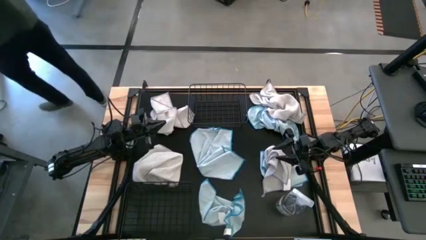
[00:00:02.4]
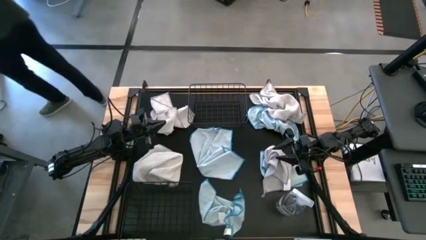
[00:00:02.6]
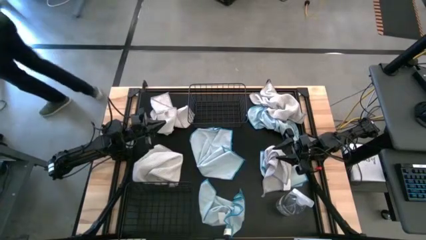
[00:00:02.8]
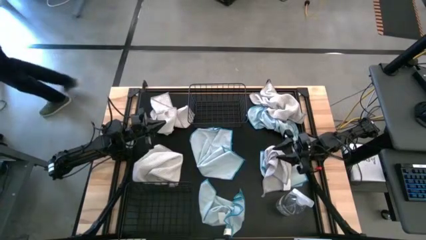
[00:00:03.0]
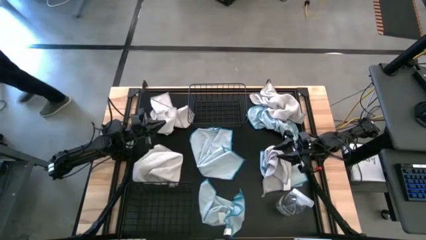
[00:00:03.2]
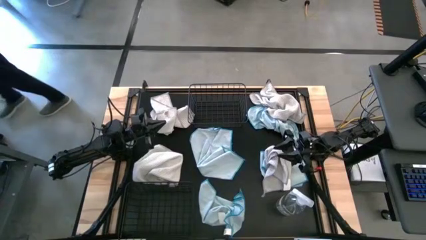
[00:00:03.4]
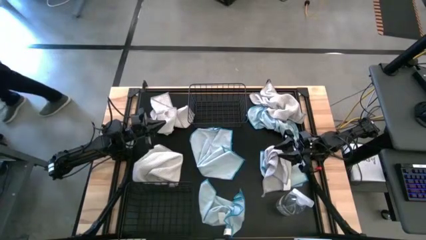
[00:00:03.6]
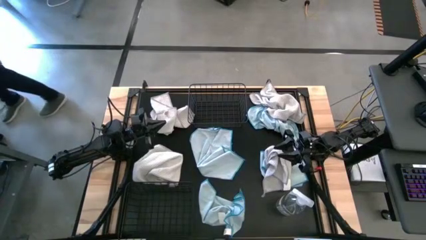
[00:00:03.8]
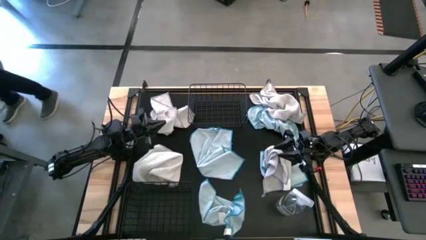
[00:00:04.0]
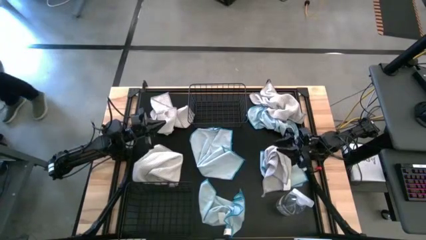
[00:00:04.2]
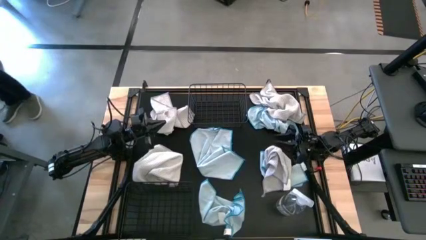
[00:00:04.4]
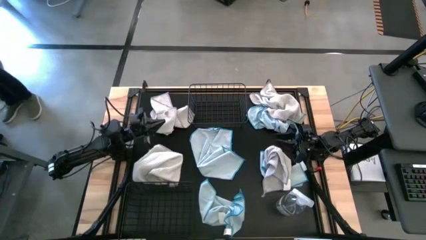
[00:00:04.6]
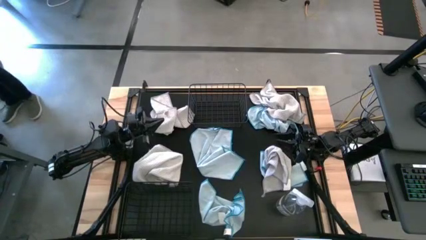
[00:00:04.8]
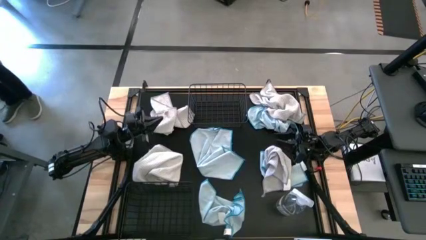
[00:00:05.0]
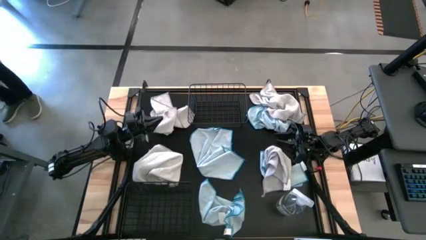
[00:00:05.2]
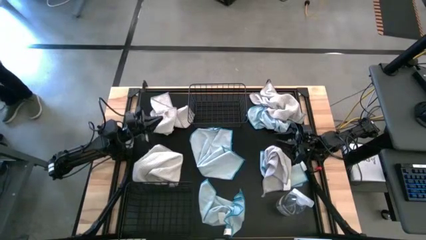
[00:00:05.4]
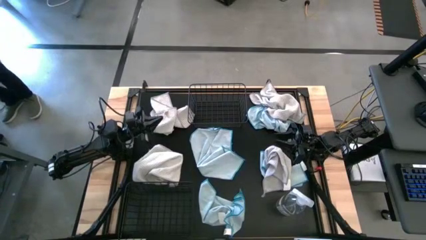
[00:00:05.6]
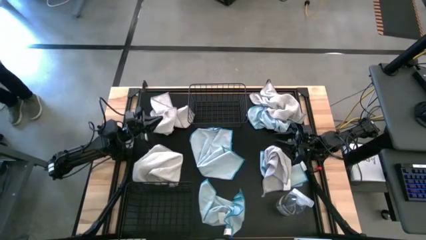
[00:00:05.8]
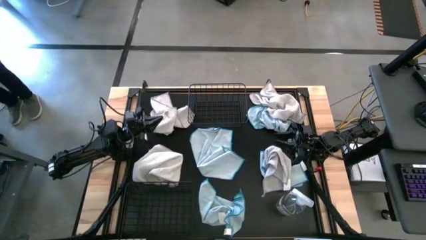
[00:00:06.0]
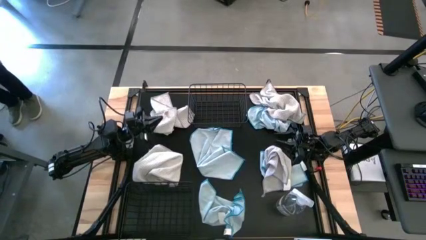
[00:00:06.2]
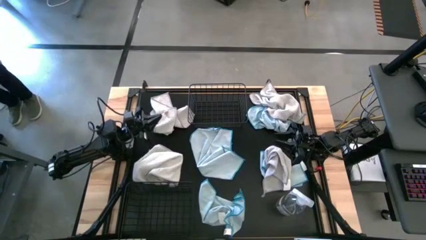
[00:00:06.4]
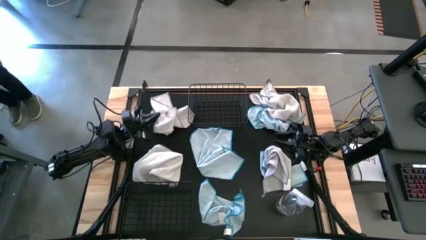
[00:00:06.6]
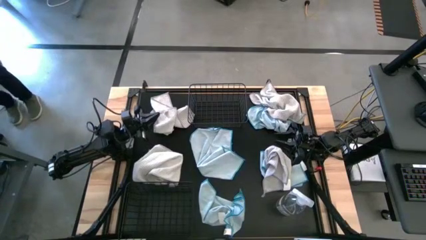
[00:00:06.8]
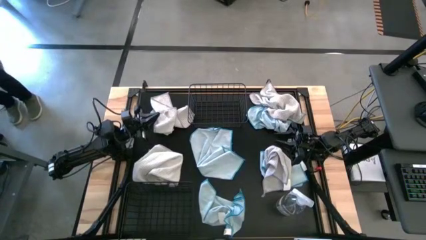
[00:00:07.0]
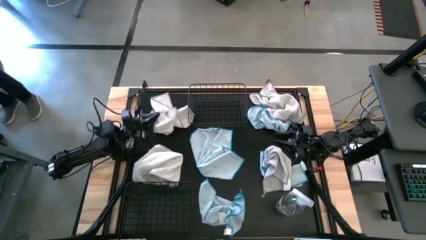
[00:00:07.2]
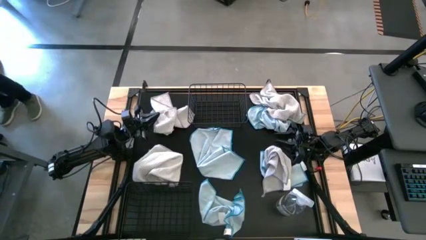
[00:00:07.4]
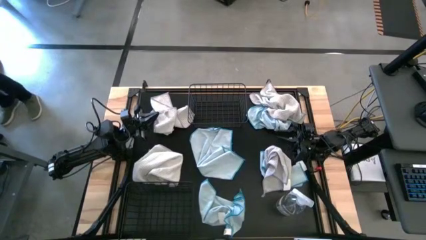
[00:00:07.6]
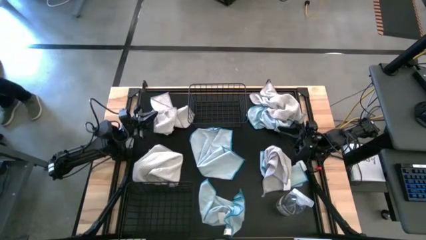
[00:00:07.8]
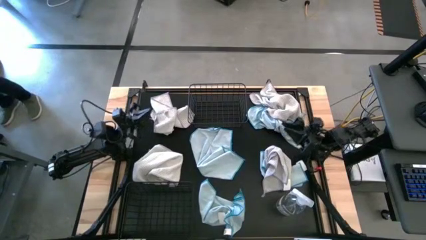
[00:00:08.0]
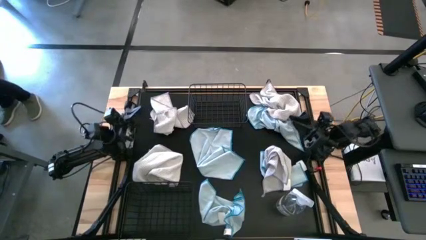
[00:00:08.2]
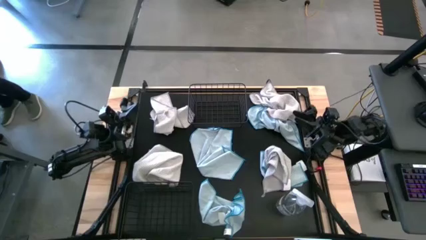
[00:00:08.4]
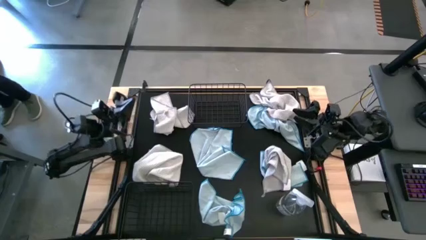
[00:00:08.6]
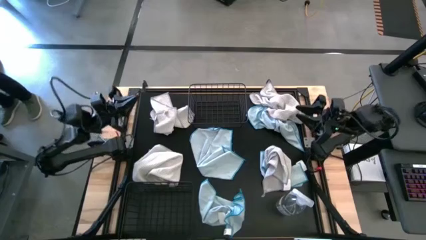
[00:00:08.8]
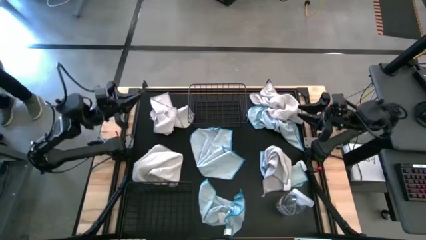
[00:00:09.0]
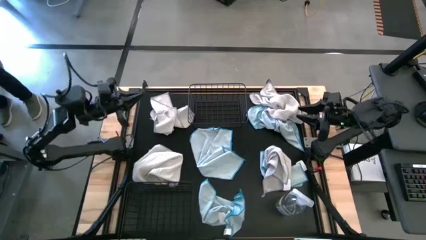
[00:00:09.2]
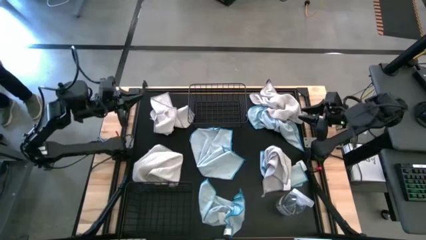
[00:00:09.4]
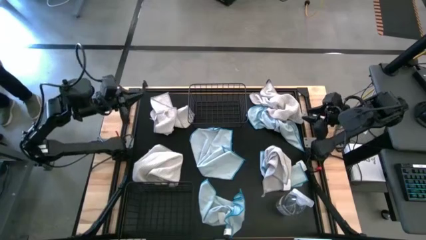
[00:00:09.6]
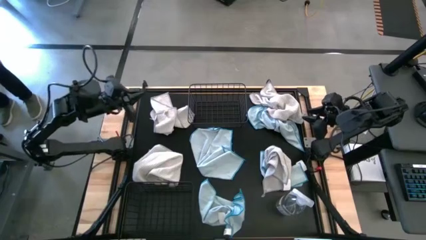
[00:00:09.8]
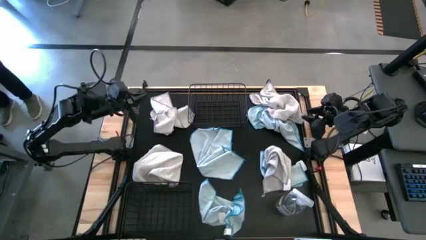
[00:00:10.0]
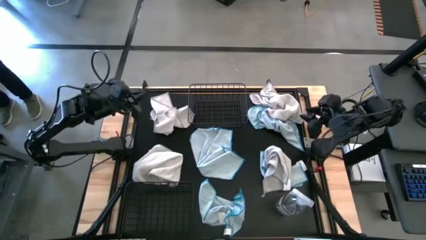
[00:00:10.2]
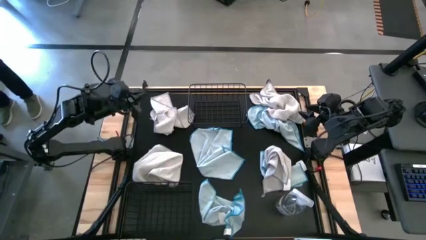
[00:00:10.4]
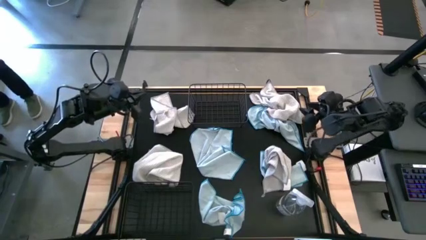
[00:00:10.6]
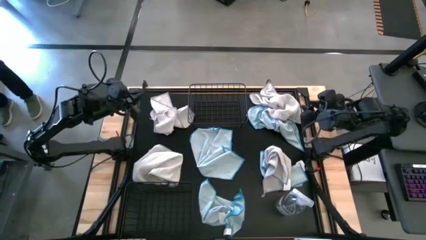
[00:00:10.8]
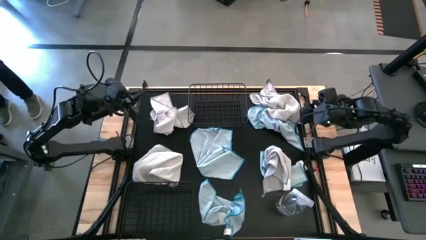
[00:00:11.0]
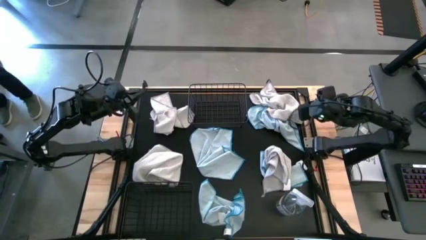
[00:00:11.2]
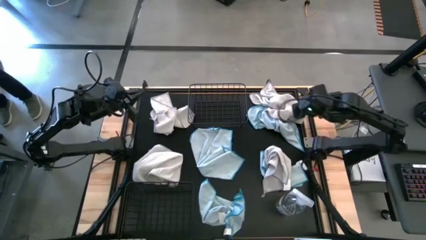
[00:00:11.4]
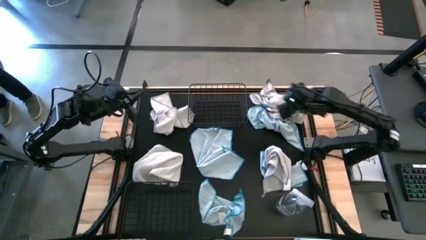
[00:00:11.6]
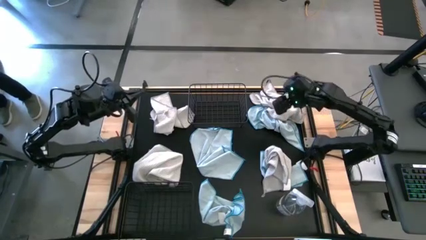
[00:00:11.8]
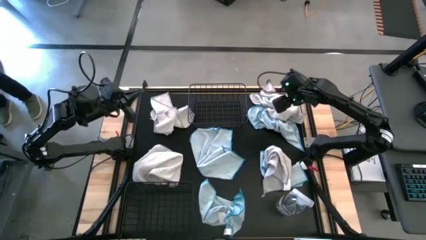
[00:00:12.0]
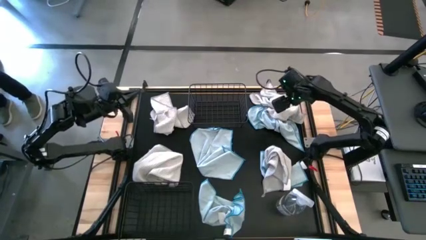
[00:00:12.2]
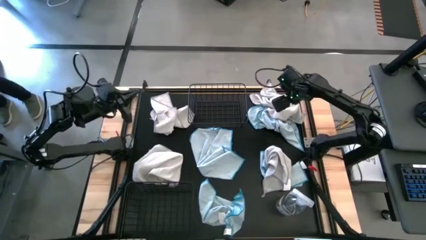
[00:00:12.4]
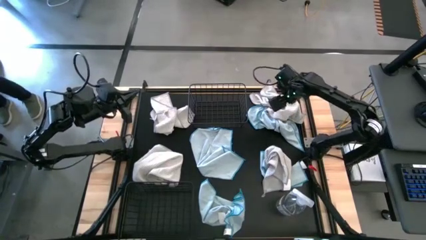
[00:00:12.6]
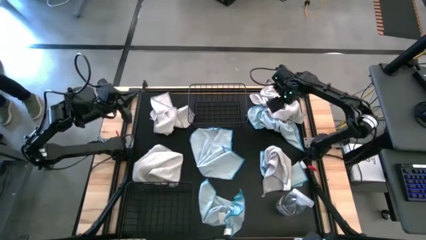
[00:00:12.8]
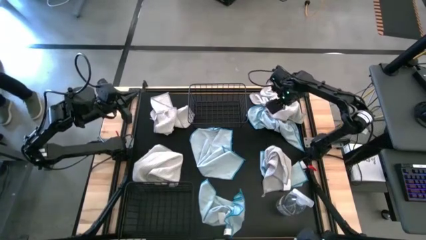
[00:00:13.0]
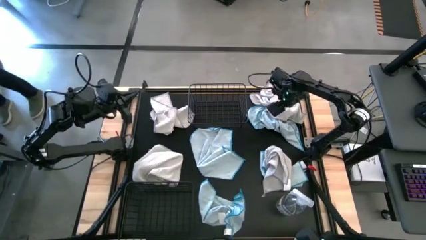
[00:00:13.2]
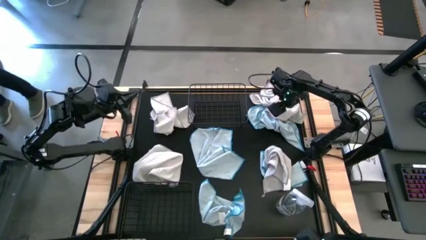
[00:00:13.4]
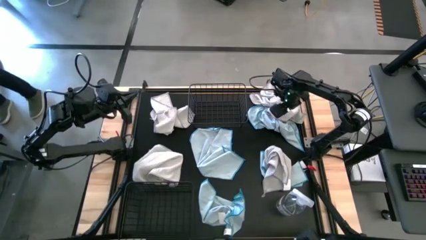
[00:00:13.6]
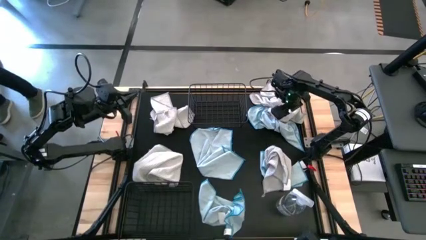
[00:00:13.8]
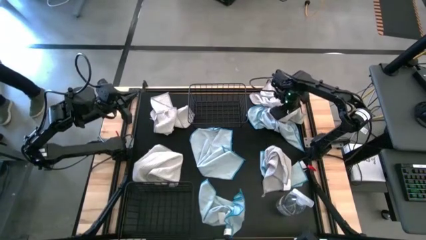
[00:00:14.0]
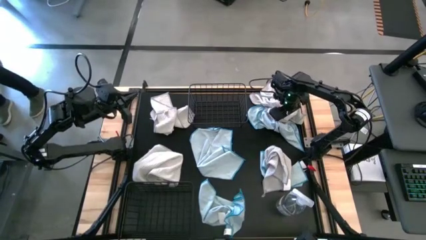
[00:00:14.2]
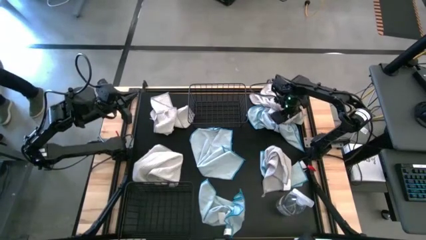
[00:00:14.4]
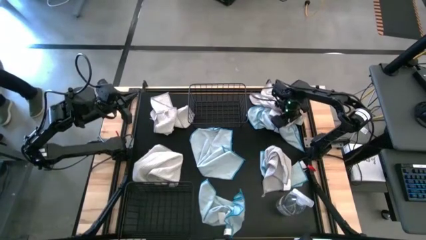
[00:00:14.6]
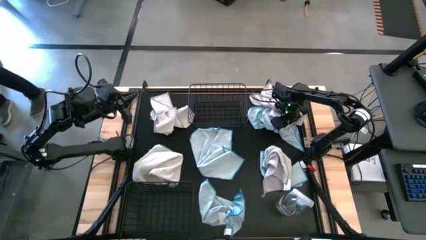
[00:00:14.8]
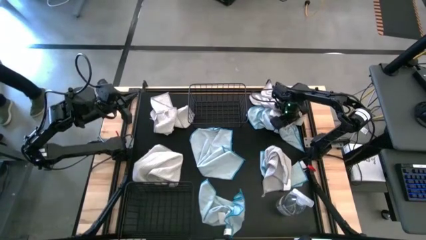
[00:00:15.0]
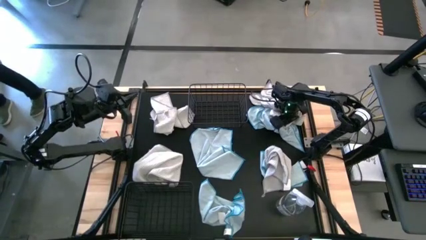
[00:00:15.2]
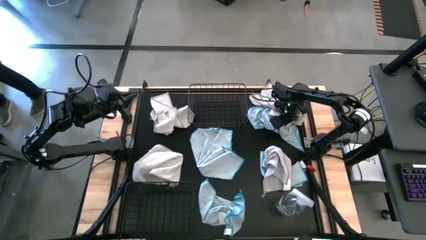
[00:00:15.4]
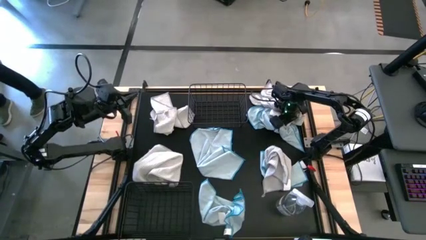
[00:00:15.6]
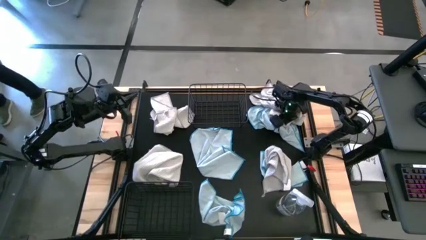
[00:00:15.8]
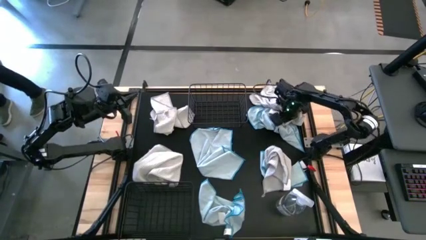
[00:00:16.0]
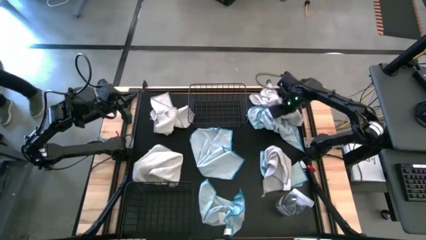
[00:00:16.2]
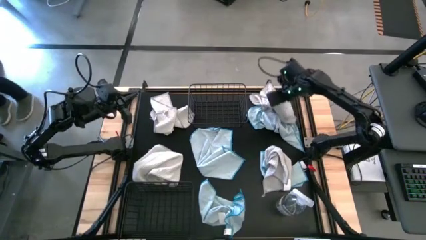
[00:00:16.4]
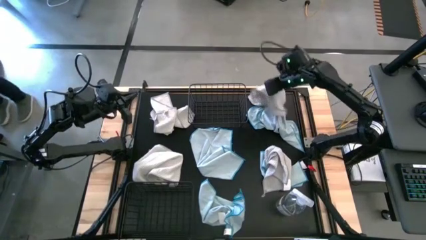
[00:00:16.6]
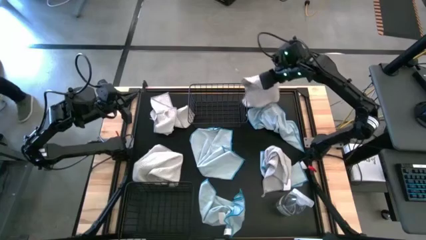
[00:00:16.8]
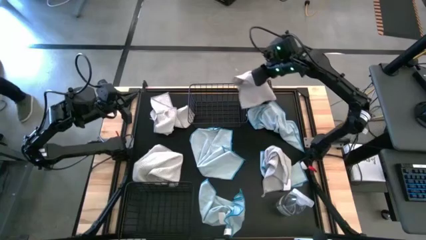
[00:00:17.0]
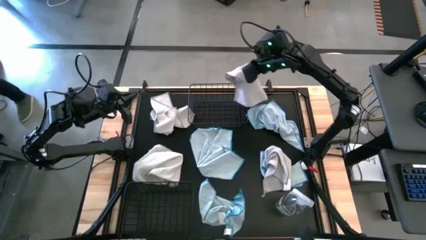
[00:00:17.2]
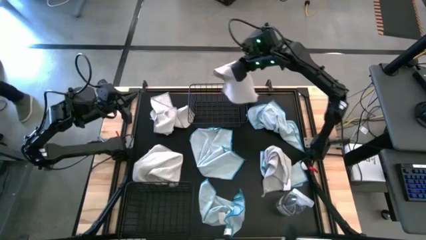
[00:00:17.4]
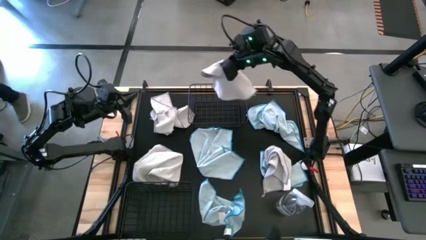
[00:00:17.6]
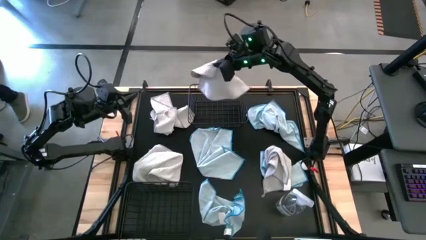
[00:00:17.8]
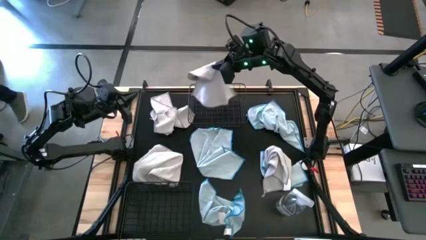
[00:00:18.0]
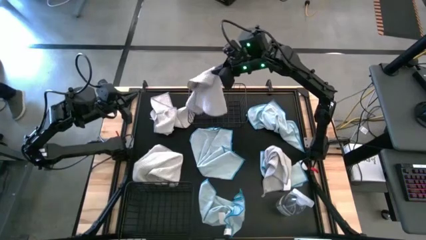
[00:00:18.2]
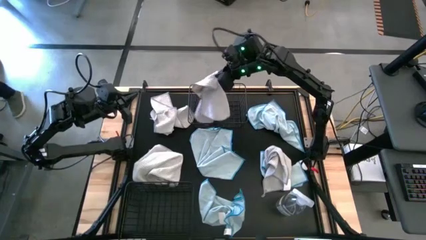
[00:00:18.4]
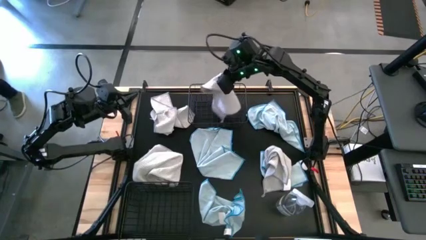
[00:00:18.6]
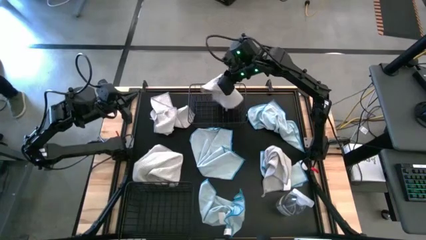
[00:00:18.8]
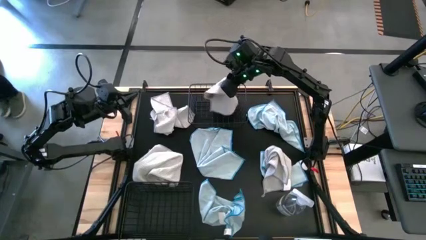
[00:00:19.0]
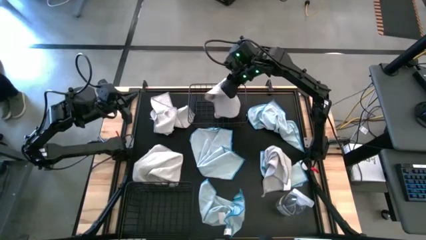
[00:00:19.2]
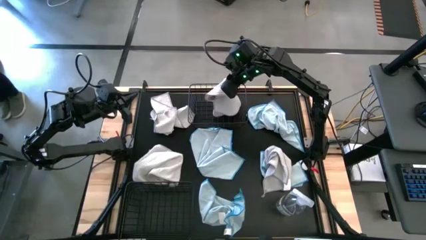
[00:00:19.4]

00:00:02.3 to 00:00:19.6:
Task: Sort microfiber towel by color & place in baskets
Put the top right white microfiber cloth into the top wire basket
